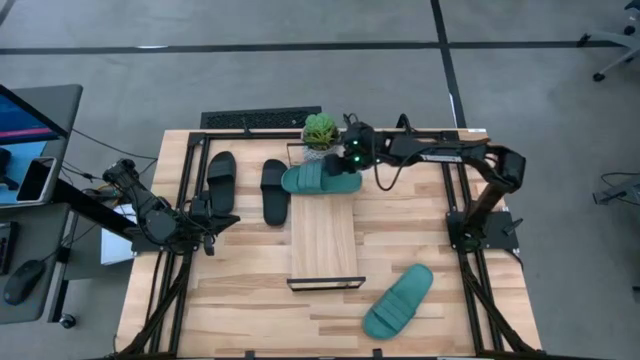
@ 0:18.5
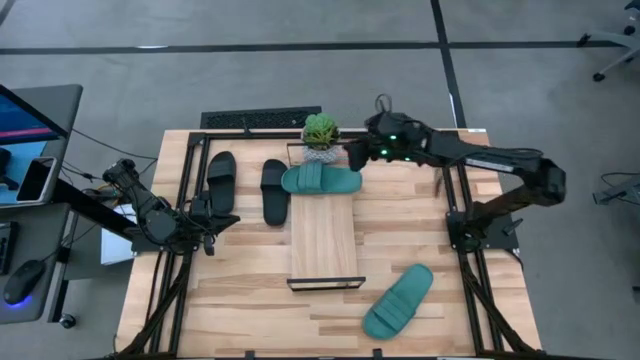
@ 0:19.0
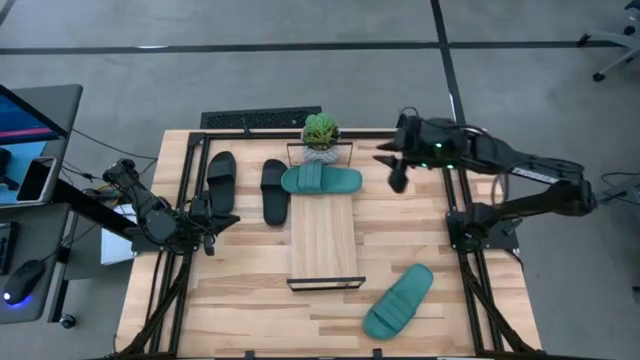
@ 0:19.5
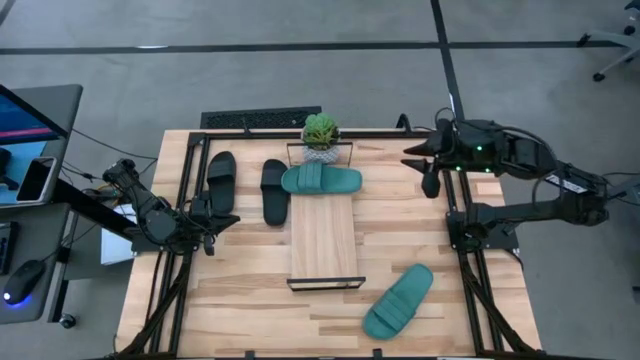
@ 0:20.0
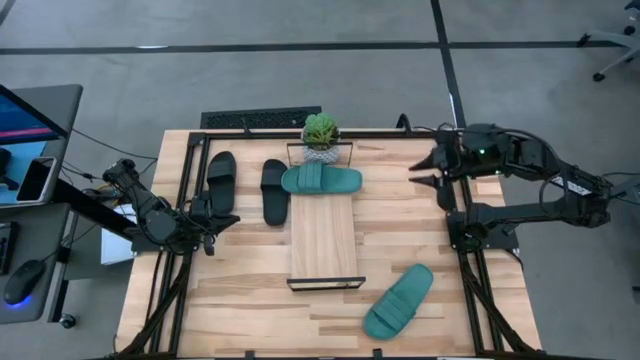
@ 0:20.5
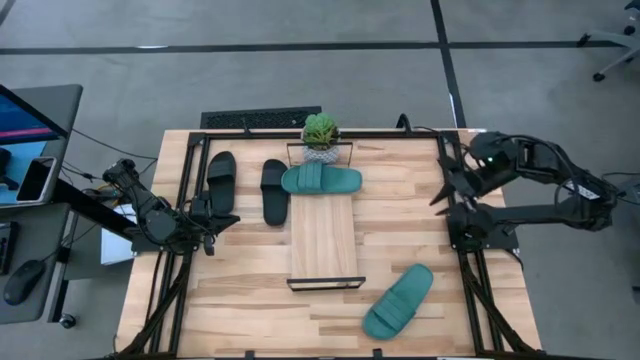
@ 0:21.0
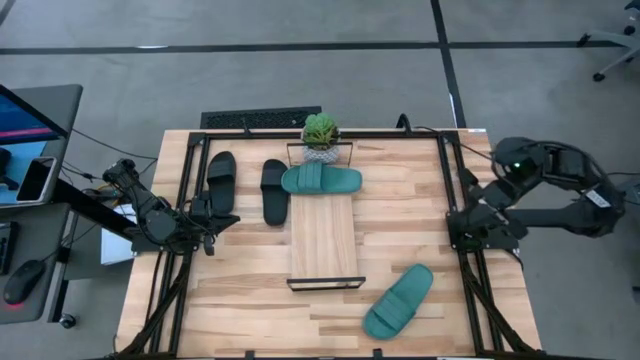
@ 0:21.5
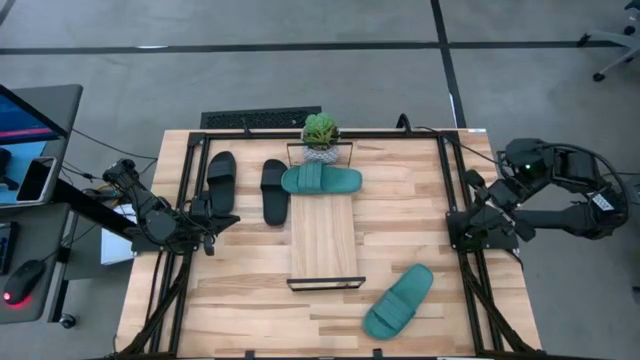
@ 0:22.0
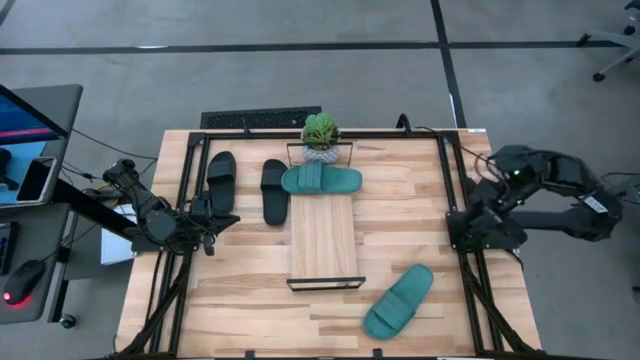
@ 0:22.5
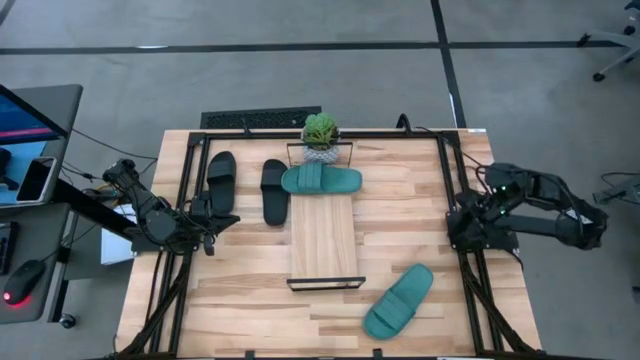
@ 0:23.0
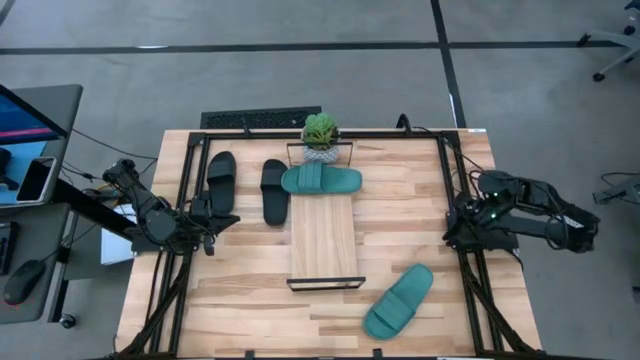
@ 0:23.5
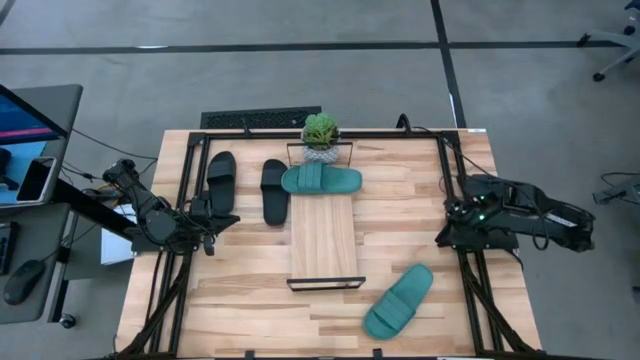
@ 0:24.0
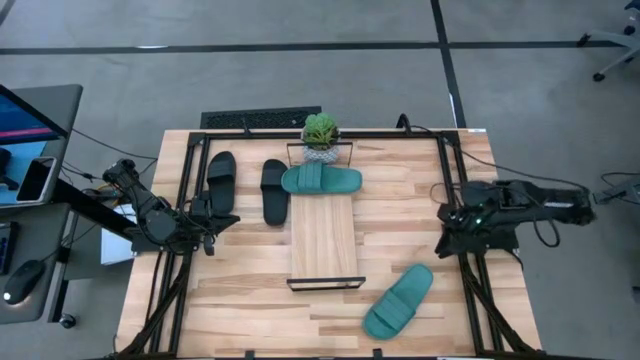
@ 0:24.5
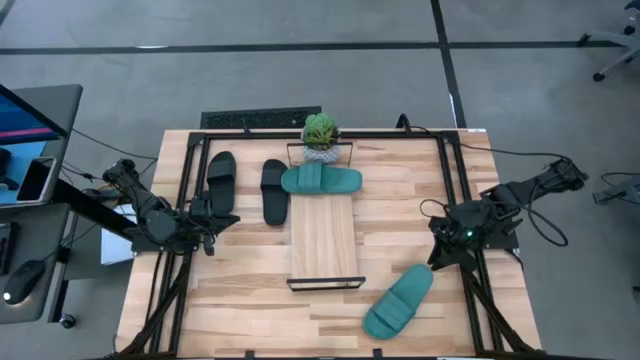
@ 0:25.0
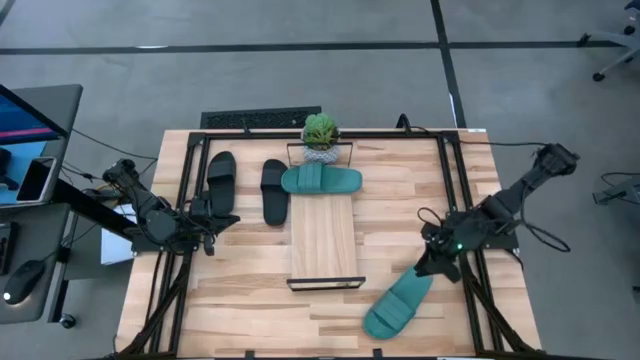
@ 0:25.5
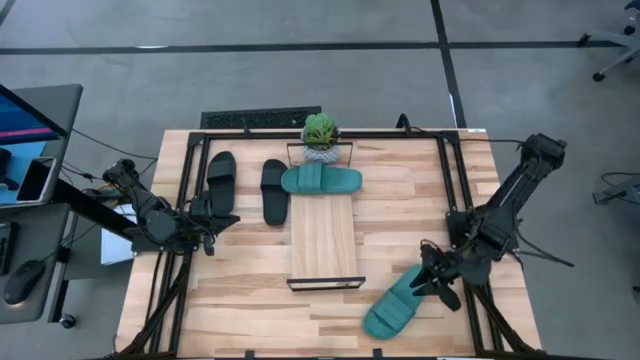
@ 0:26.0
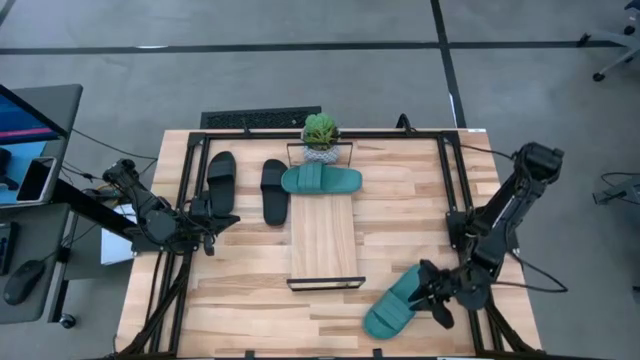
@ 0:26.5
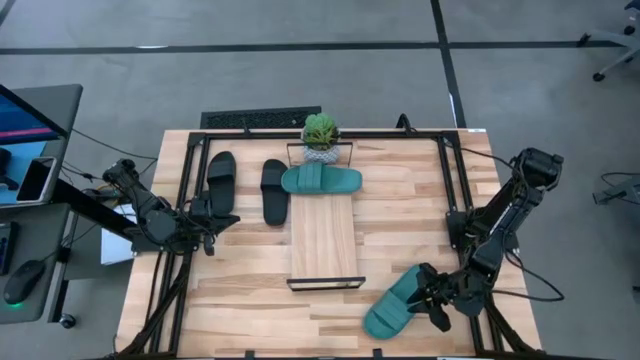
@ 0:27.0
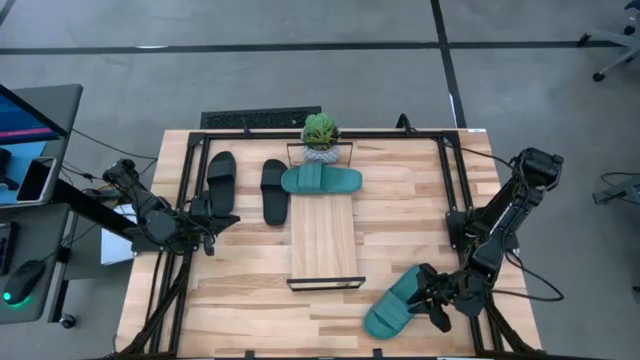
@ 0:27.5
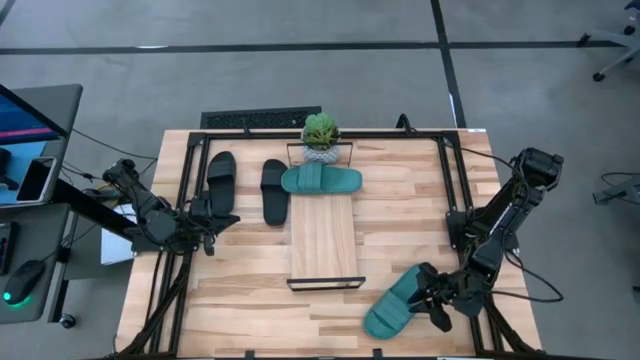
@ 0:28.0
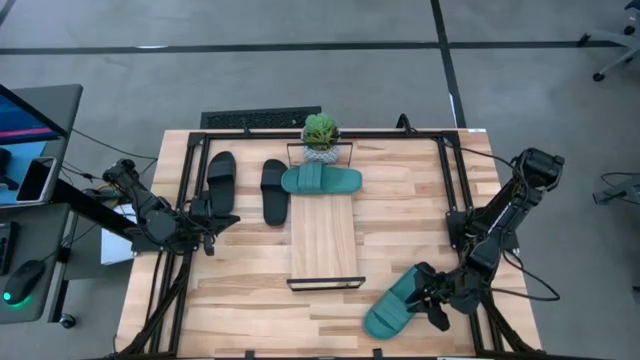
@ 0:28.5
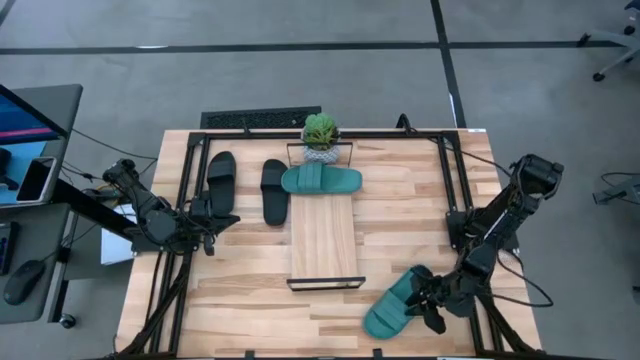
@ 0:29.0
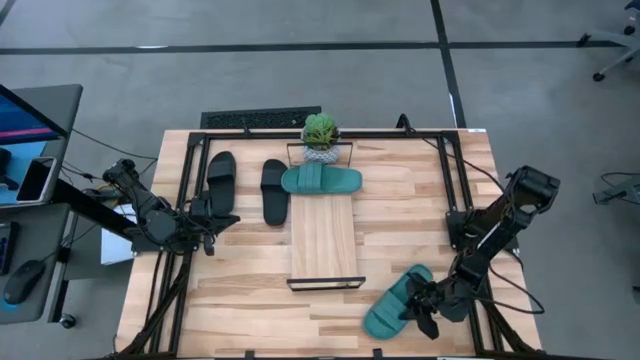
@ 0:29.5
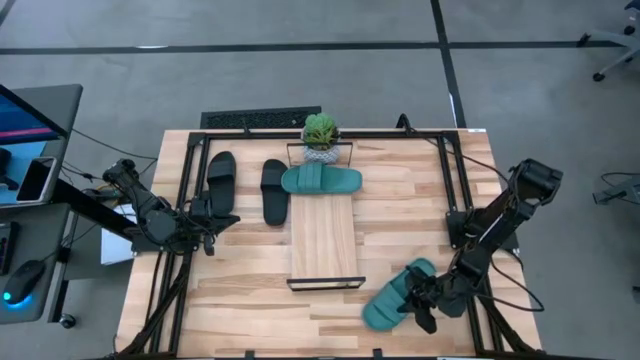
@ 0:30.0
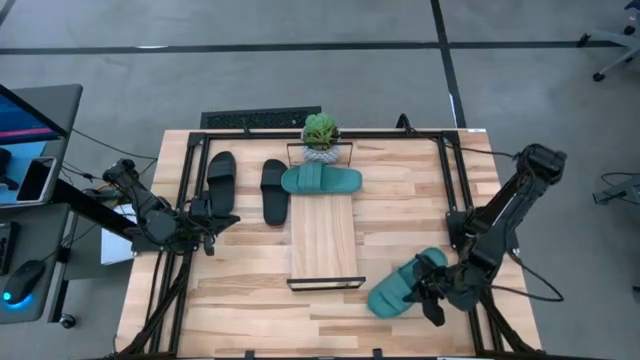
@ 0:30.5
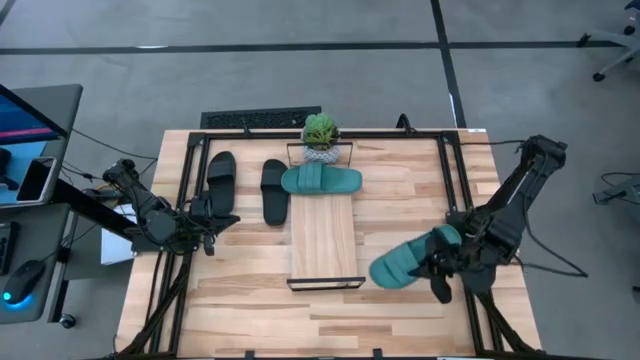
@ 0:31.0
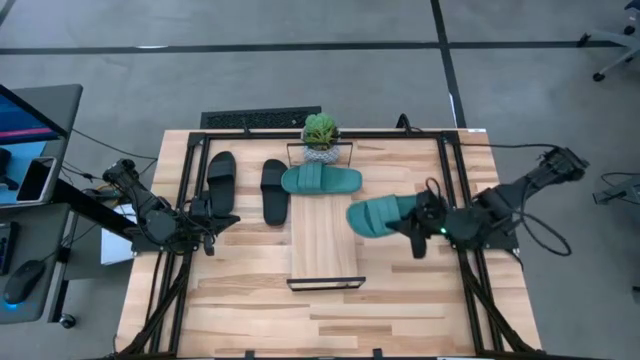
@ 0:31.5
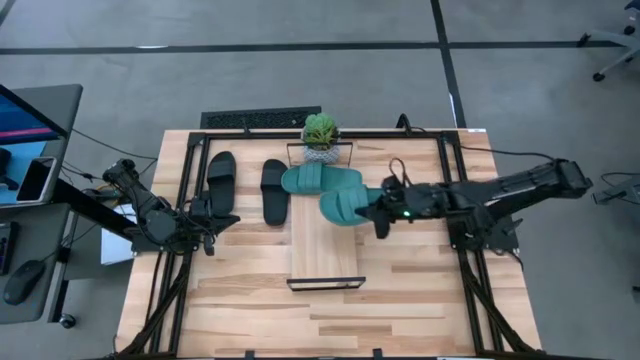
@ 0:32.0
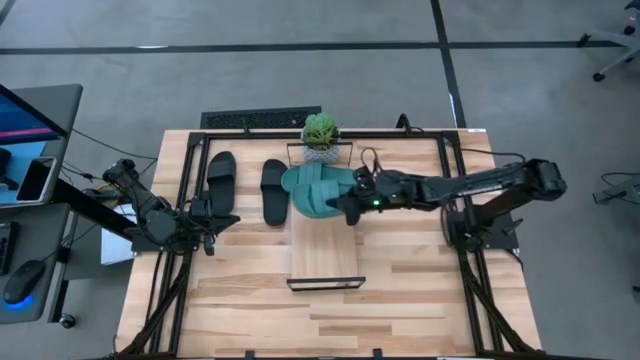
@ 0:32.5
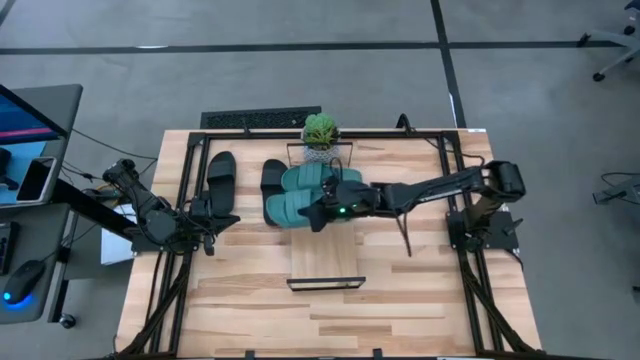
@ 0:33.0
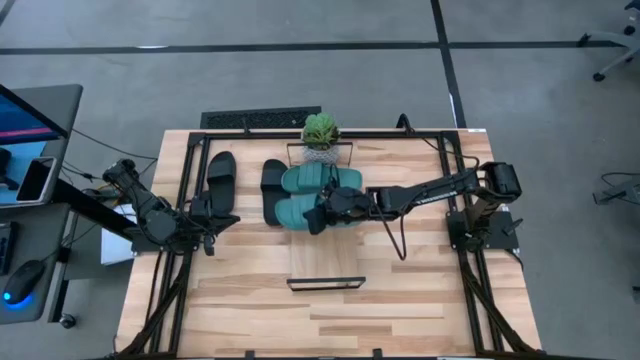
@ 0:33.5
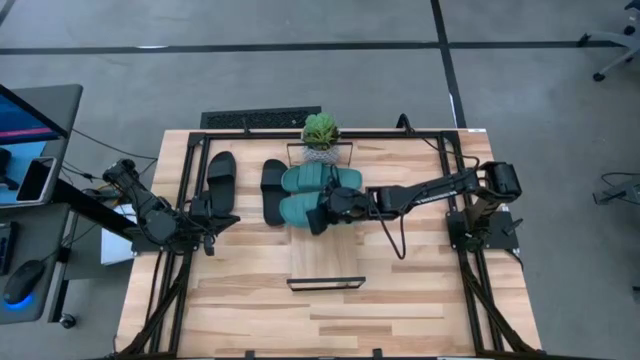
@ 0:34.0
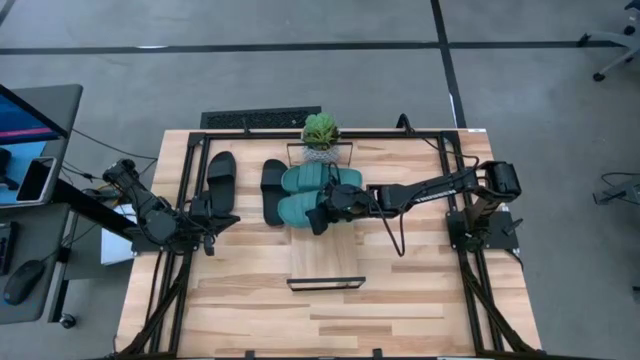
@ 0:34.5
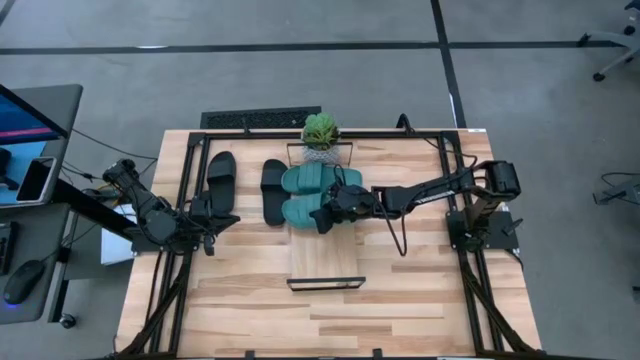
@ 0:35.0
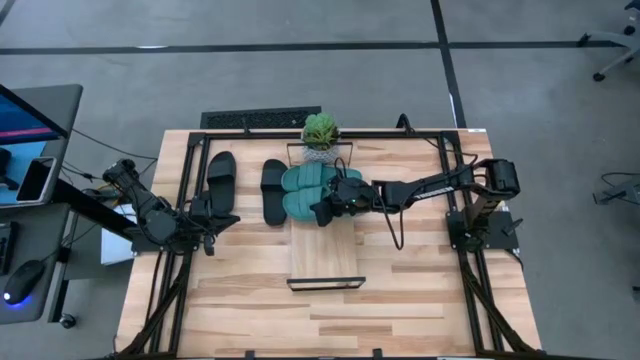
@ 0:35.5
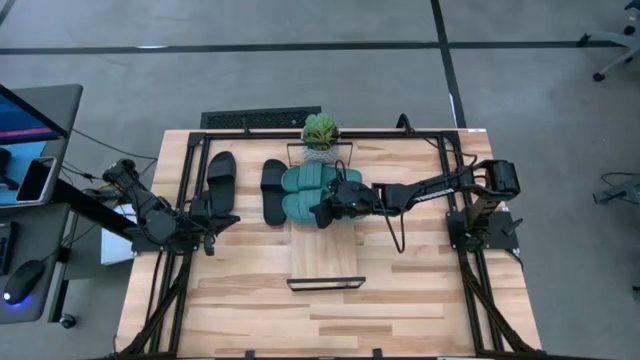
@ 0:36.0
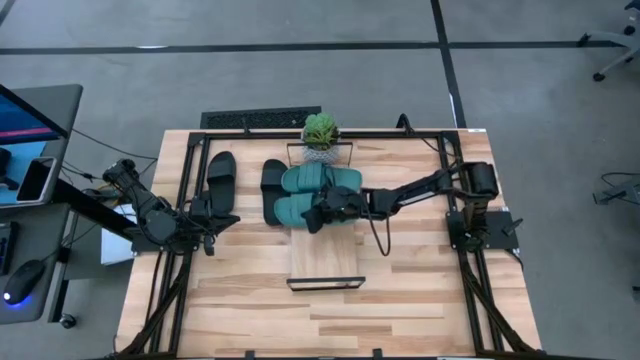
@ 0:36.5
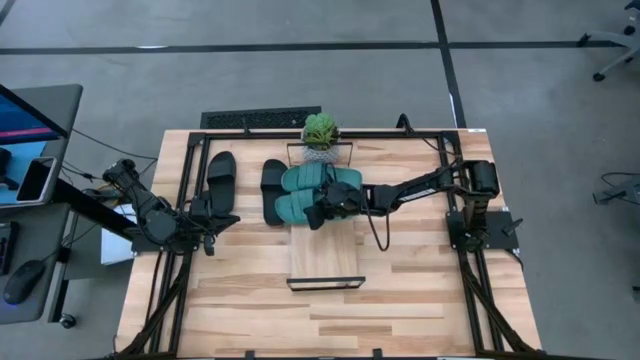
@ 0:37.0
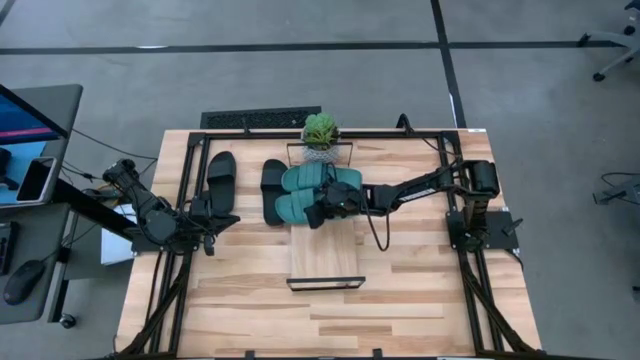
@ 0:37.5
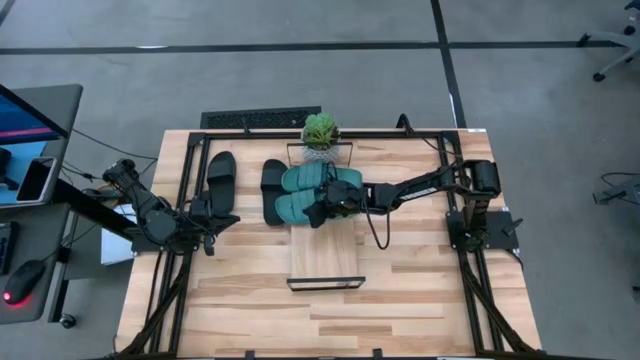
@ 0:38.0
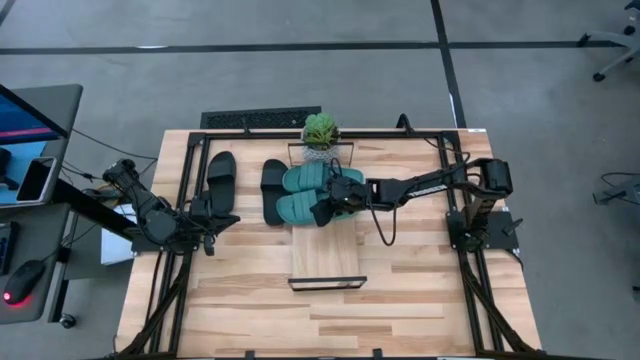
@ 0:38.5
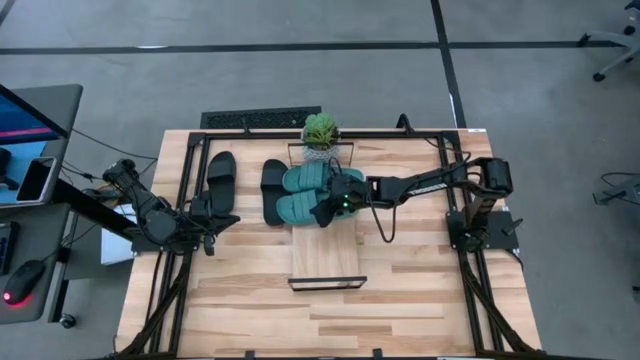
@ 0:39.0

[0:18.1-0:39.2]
Task: Pick and place slides into the shelf
Put the green slide on the shelf
